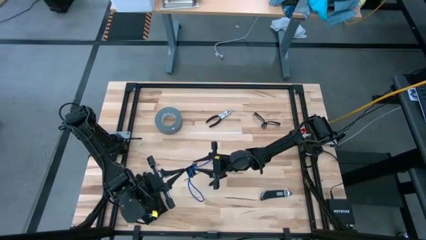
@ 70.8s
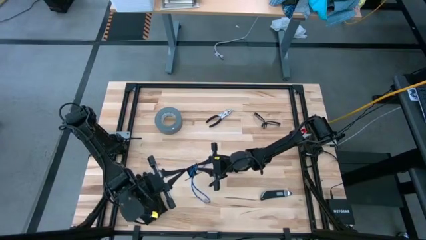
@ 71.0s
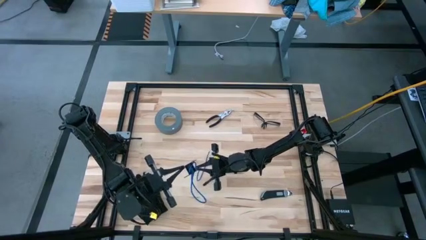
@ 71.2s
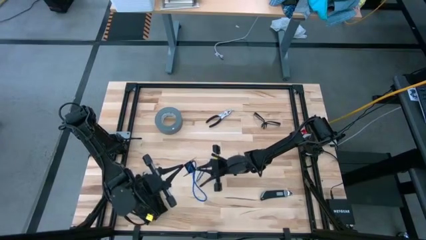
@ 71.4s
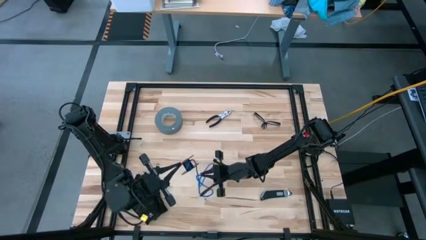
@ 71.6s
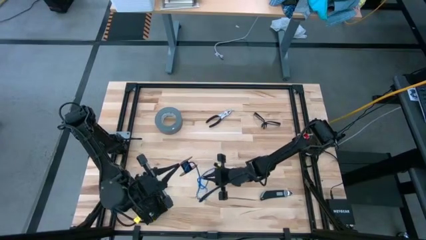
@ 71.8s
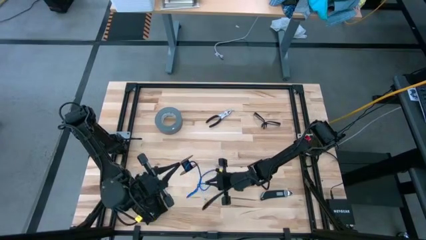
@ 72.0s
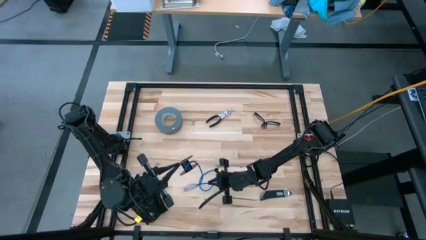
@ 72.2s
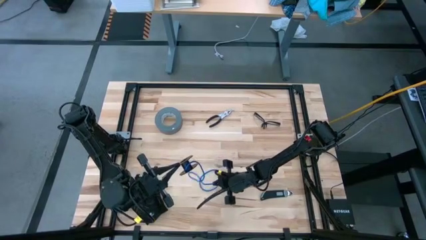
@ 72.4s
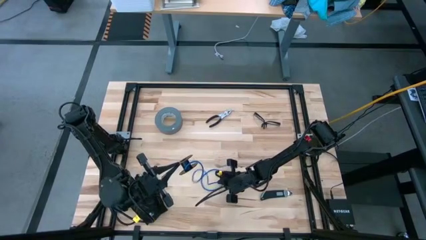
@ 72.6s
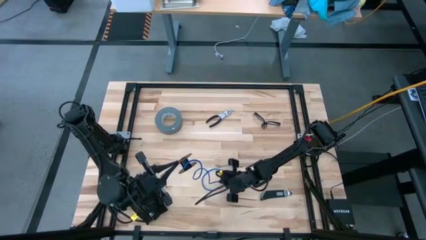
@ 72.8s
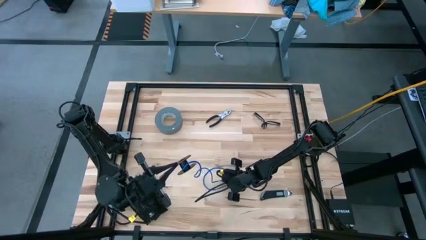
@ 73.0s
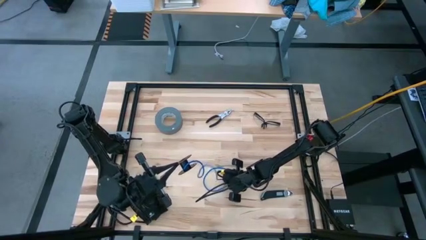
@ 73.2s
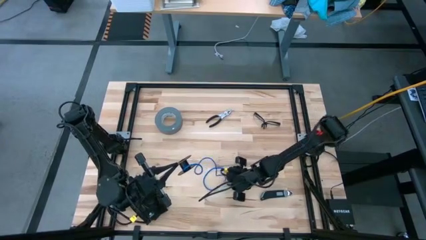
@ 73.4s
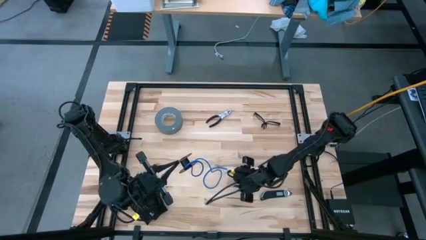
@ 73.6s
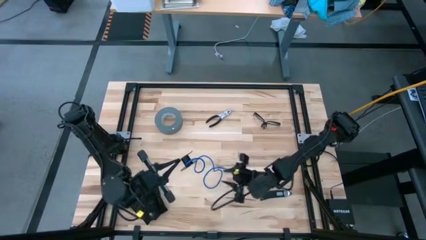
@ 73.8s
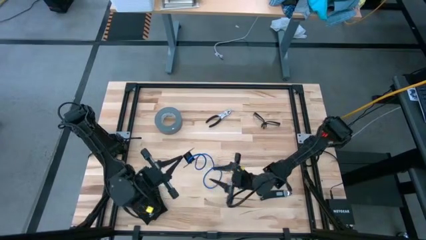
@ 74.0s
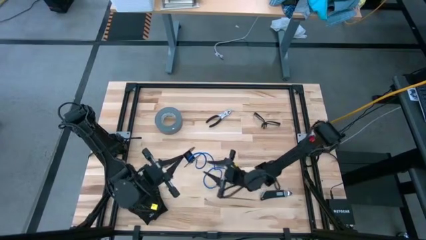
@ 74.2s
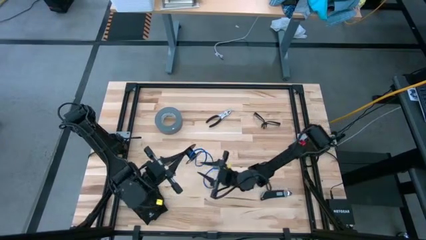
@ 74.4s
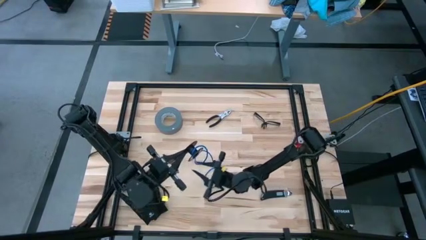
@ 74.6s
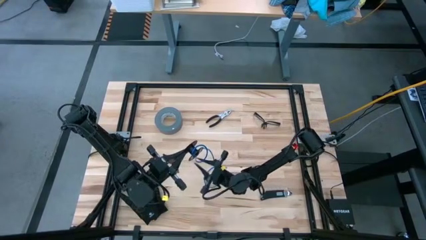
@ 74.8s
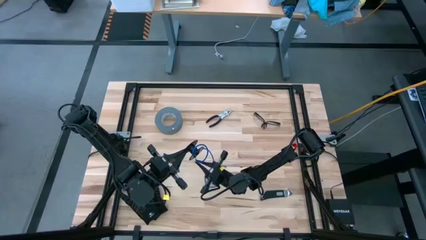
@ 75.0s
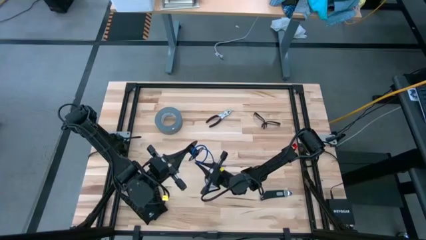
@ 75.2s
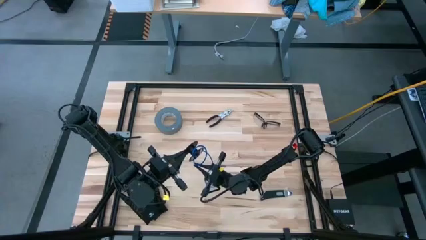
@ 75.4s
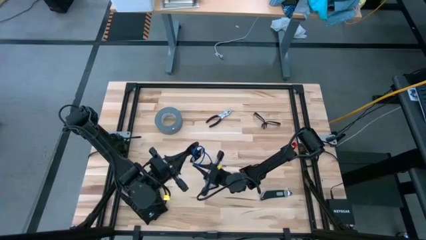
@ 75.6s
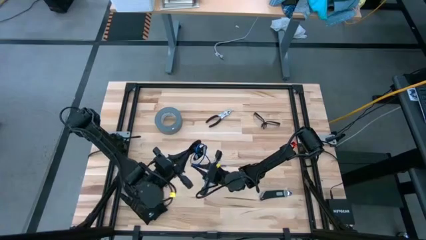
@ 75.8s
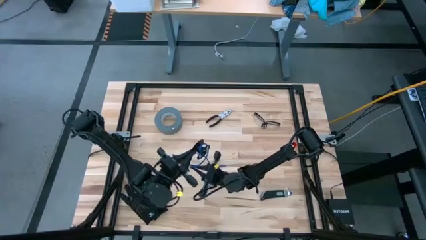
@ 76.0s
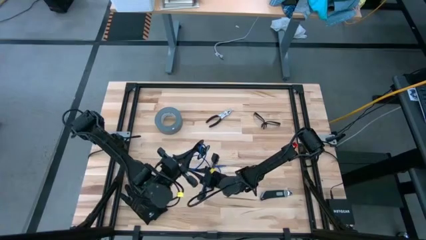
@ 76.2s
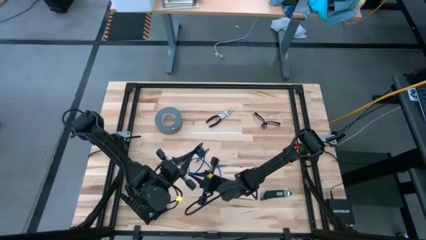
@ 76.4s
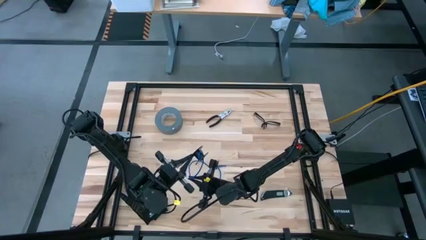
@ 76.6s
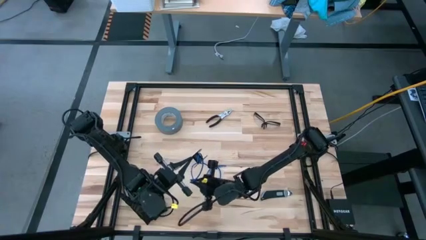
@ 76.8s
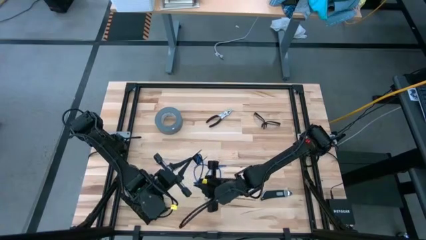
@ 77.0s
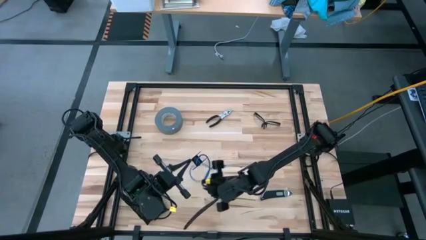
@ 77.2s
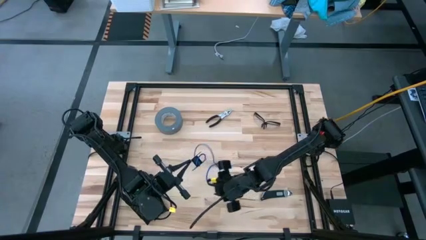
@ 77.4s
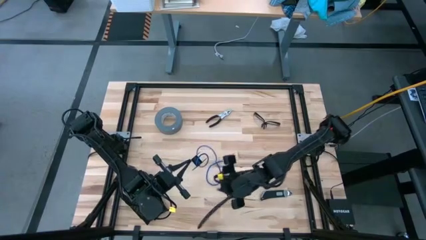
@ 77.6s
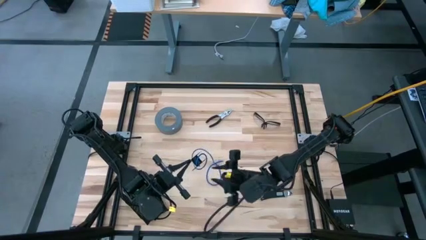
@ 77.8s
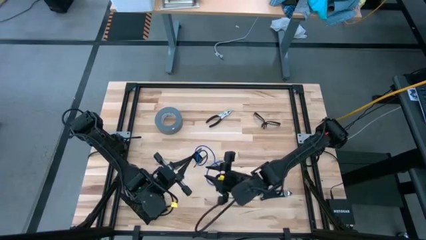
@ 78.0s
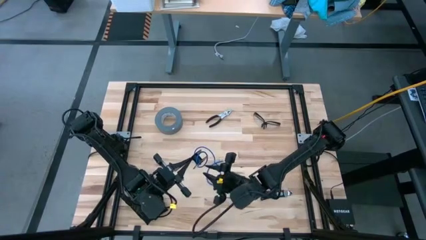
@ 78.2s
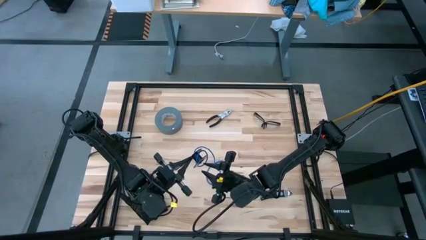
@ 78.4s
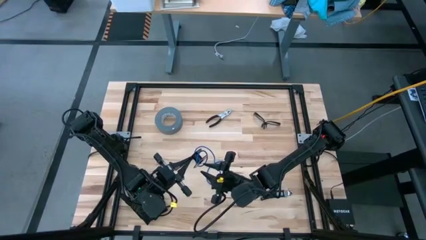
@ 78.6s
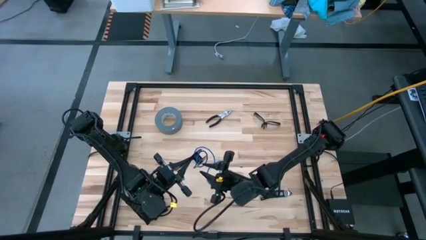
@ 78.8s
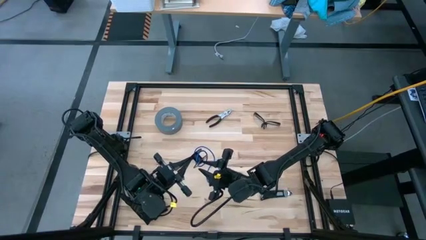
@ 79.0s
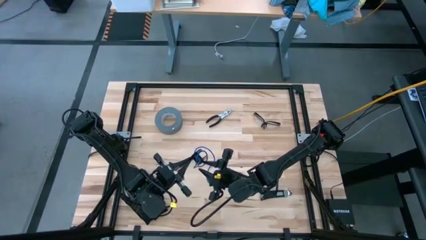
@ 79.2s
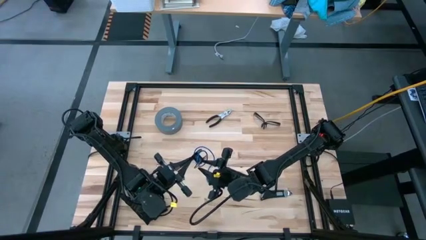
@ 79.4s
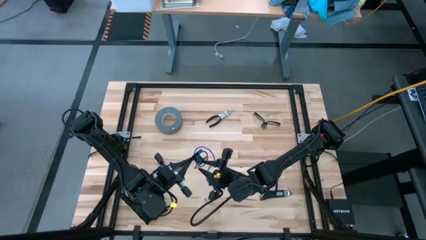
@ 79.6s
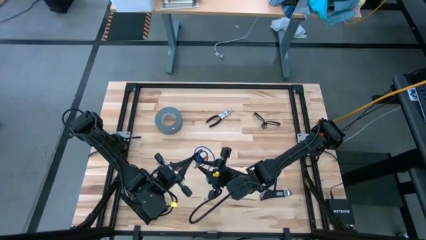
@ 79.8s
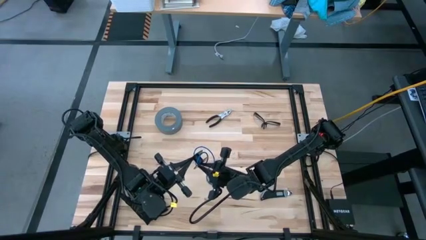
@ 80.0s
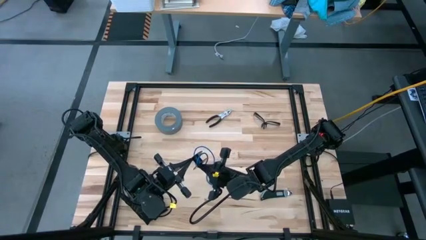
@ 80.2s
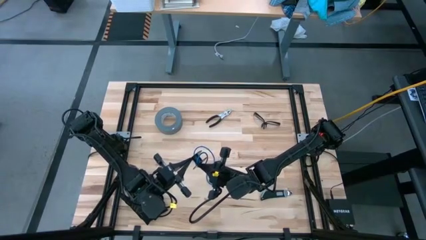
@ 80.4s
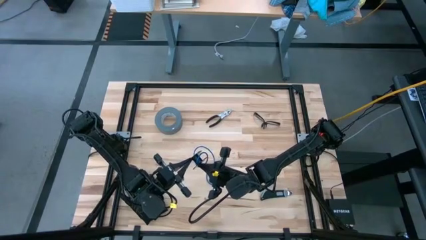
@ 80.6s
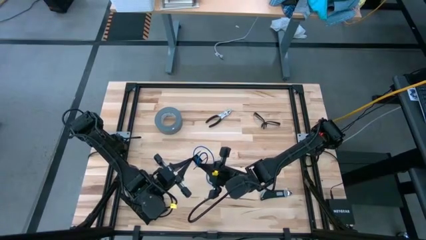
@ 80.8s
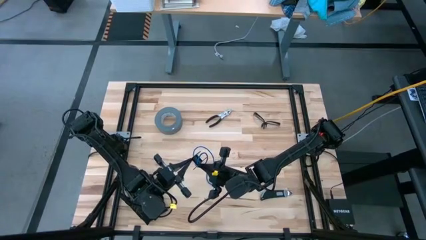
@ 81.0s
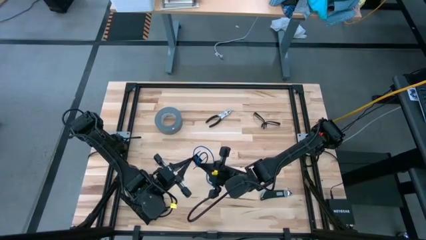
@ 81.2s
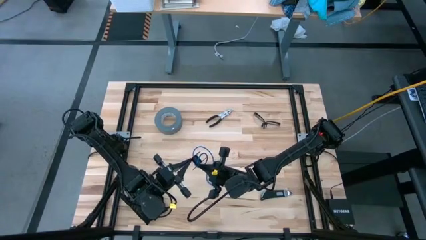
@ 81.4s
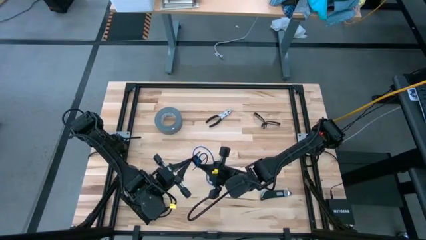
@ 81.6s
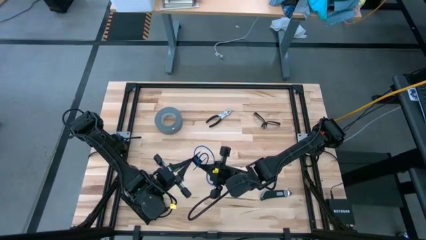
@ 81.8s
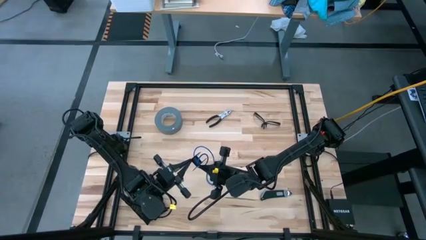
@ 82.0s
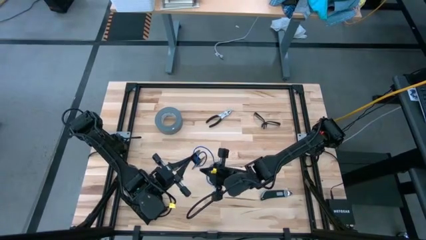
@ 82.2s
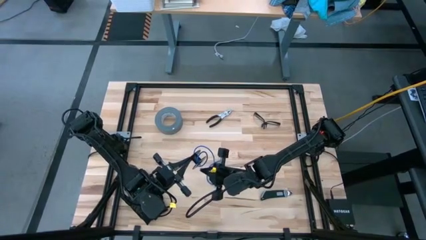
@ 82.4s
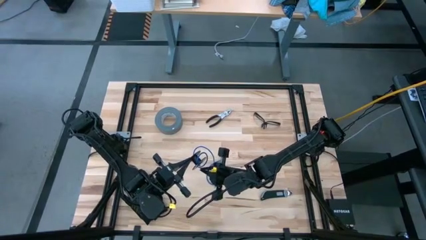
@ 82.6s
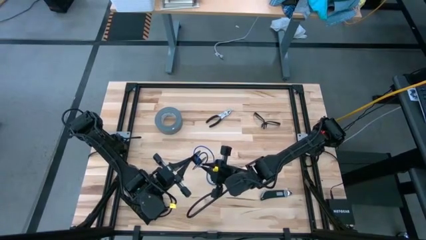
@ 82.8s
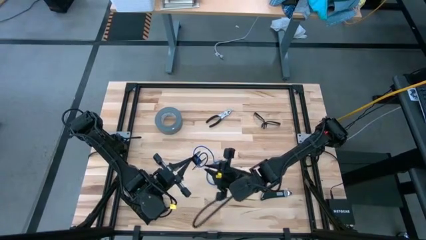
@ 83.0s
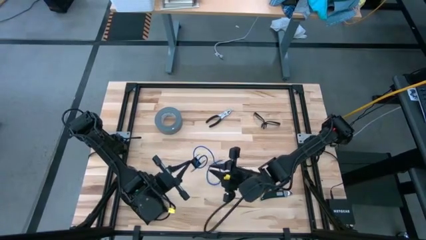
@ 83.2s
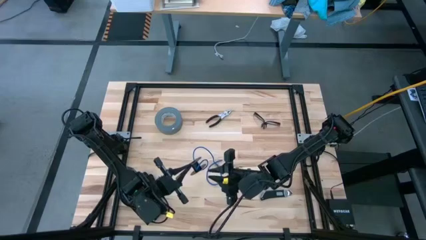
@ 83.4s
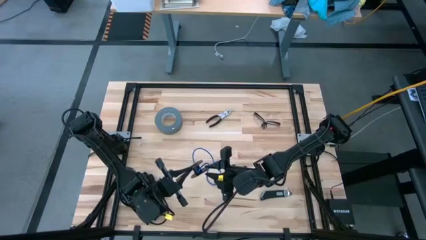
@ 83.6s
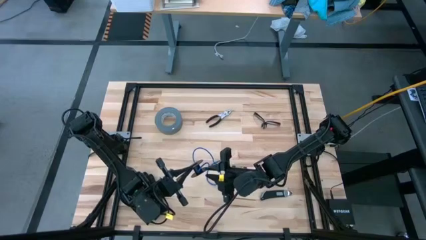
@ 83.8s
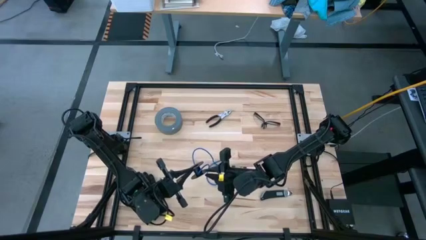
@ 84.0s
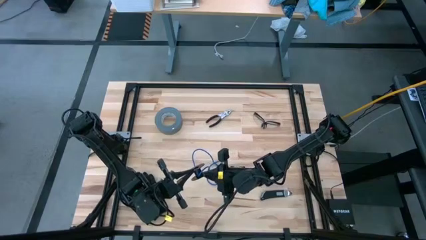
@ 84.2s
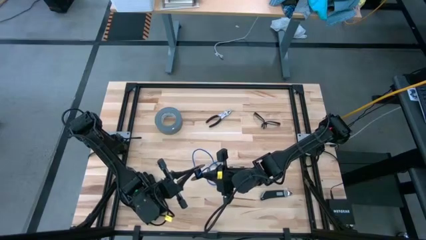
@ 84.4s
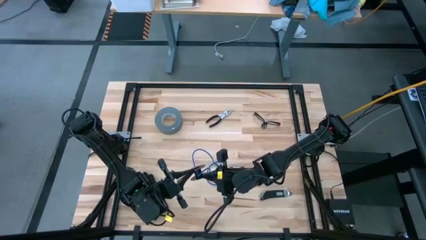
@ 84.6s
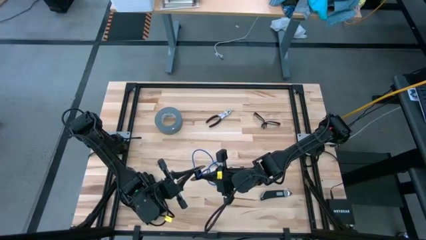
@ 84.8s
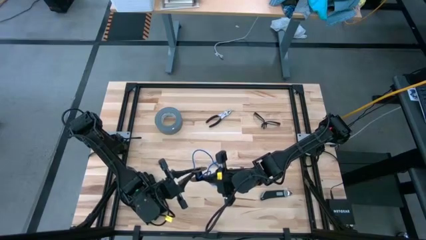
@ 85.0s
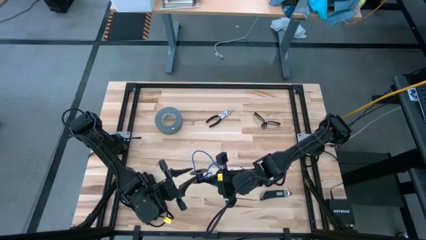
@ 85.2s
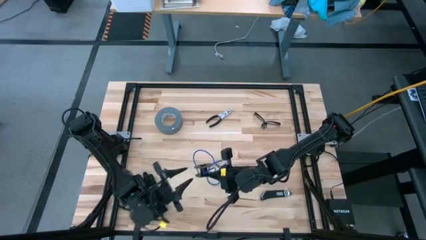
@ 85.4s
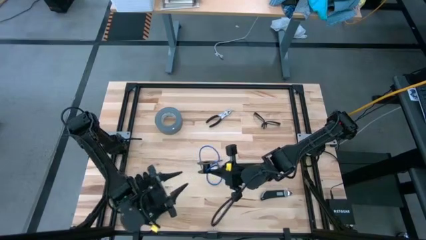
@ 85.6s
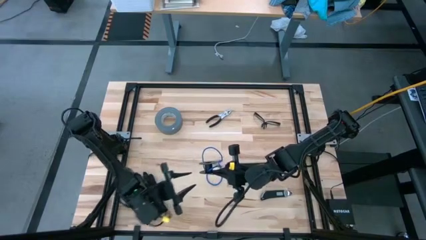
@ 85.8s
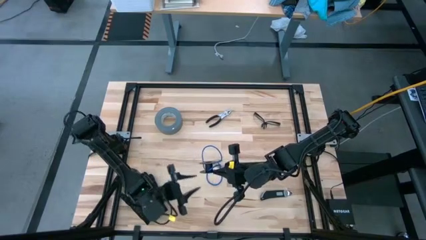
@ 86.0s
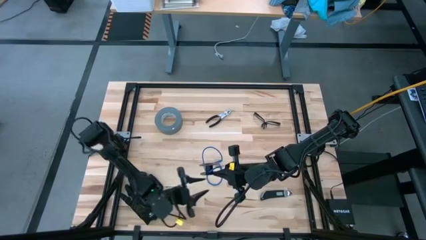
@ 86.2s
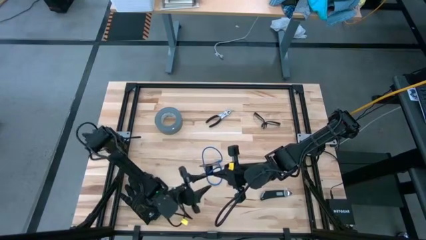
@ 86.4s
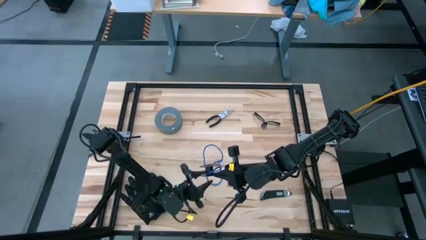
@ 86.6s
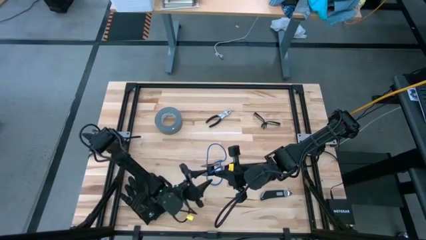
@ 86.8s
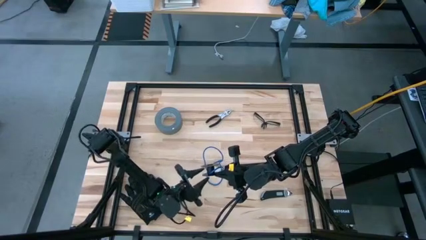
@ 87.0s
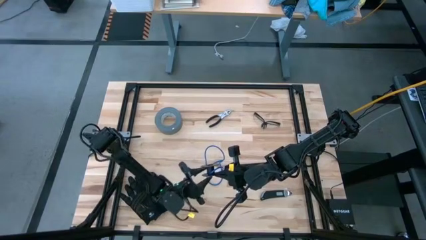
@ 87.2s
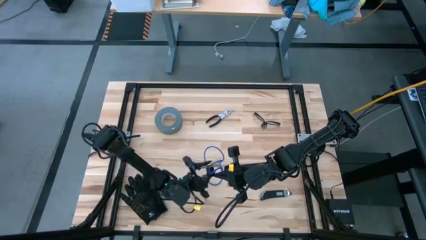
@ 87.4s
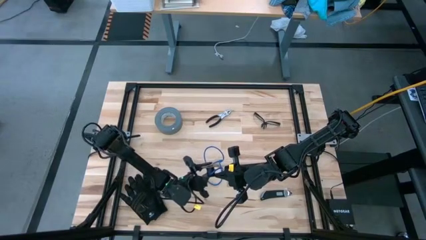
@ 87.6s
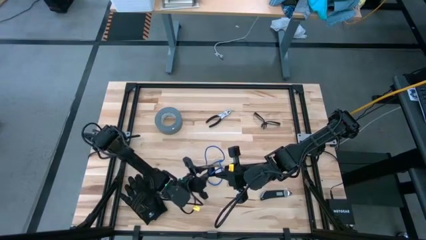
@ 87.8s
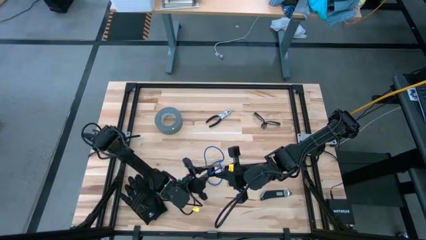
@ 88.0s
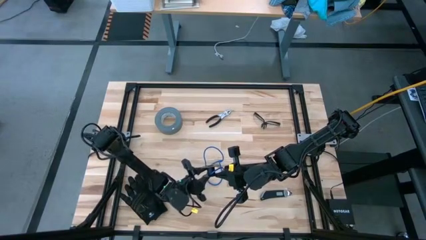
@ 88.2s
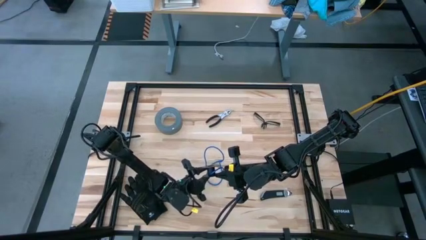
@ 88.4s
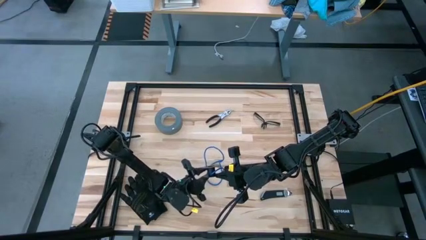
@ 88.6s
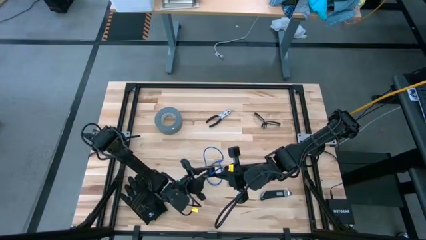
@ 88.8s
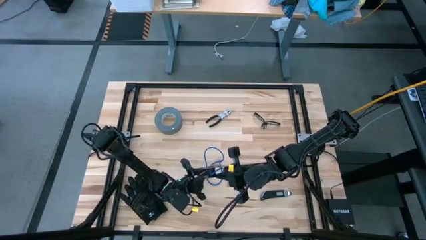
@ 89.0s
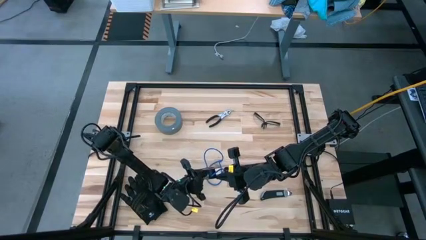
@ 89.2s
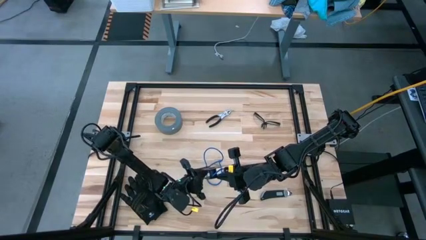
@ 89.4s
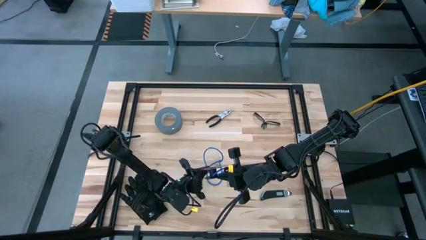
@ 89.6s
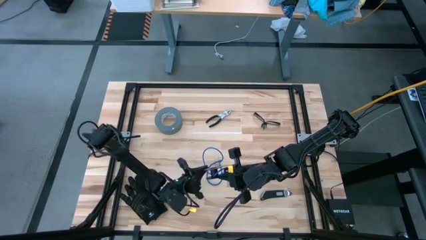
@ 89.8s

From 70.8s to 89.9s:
Task: Coil cords
Coil the blue wire cable onto the black spool
